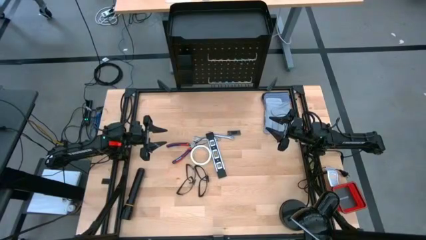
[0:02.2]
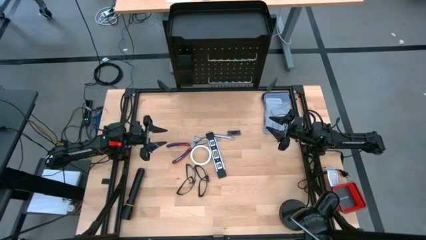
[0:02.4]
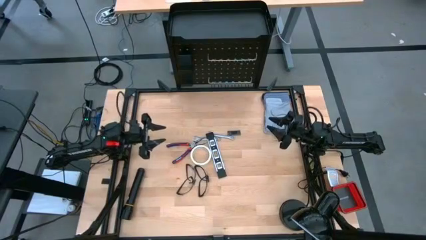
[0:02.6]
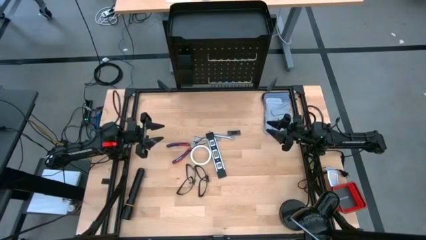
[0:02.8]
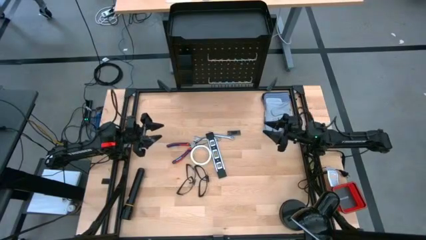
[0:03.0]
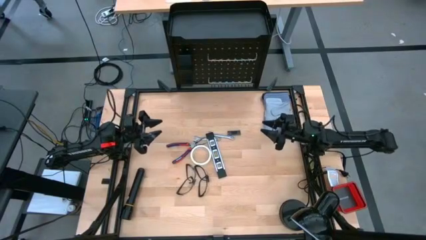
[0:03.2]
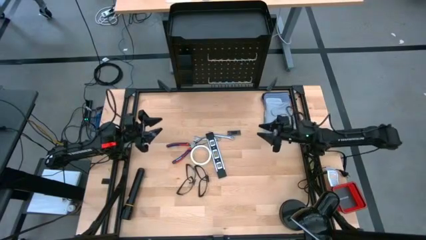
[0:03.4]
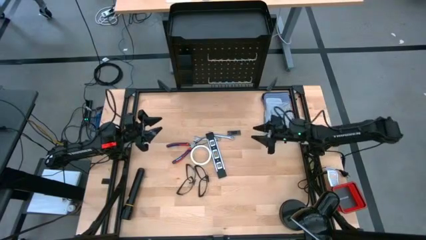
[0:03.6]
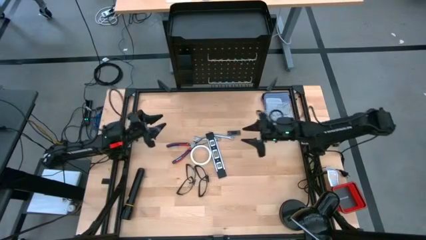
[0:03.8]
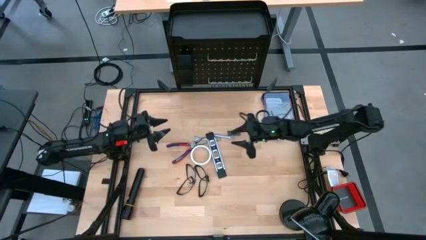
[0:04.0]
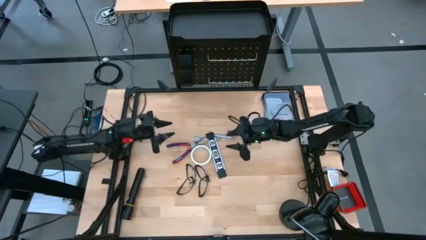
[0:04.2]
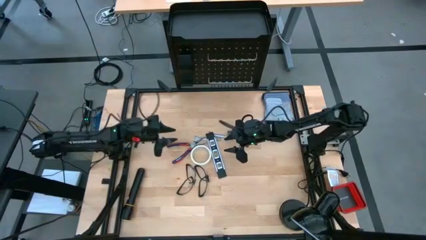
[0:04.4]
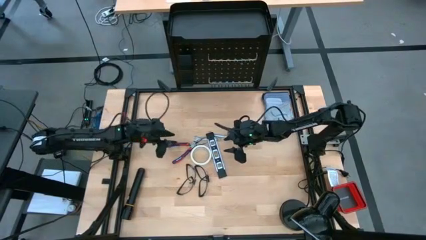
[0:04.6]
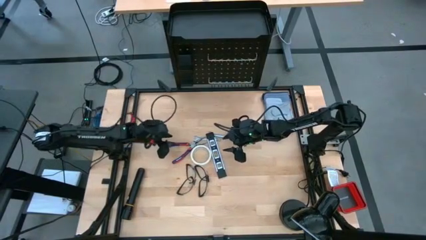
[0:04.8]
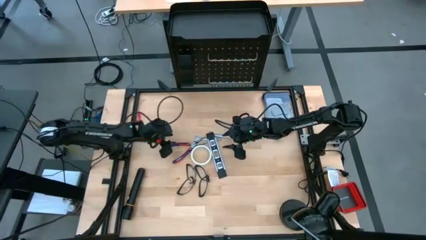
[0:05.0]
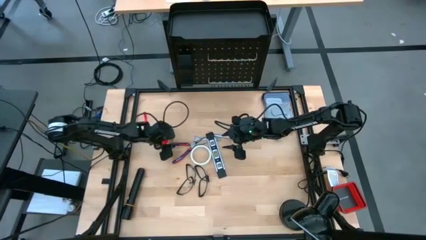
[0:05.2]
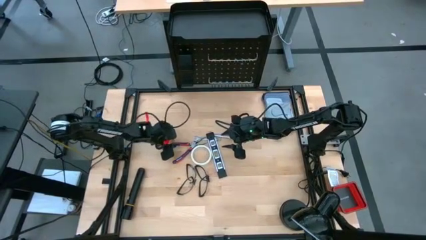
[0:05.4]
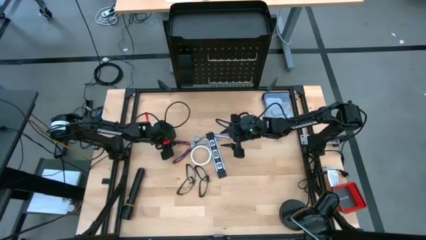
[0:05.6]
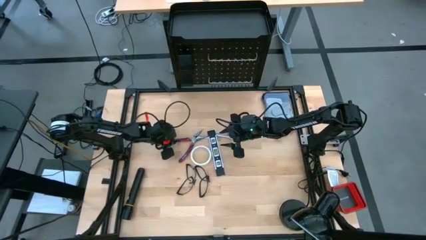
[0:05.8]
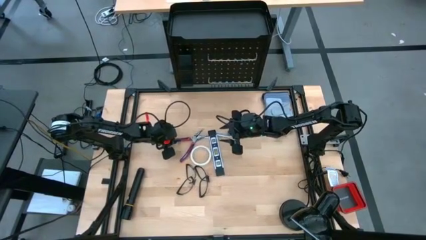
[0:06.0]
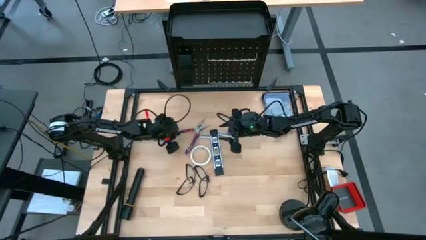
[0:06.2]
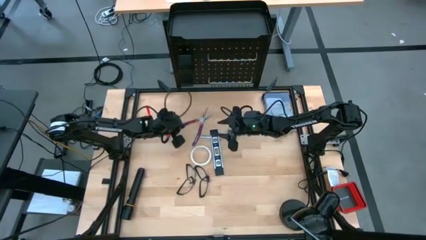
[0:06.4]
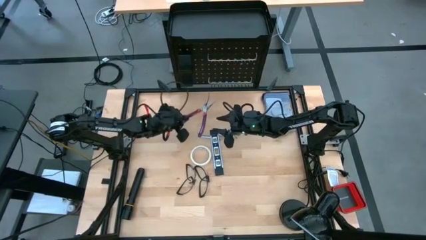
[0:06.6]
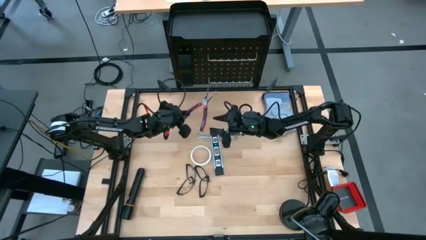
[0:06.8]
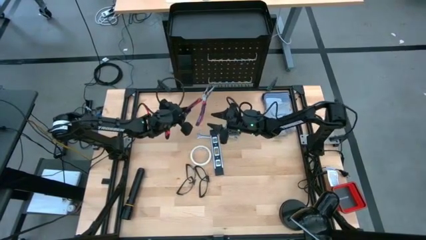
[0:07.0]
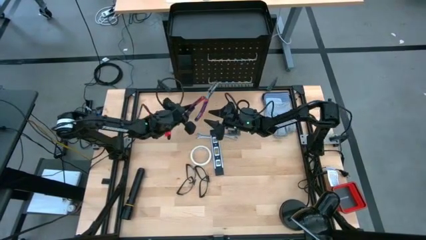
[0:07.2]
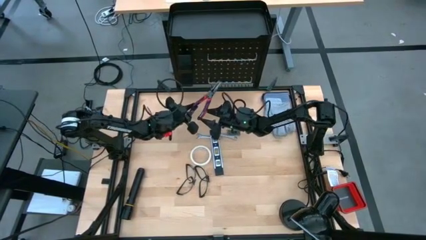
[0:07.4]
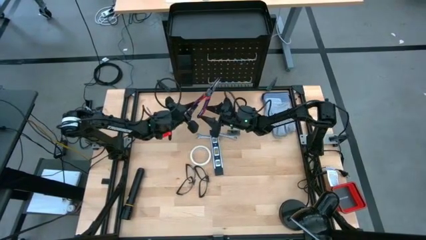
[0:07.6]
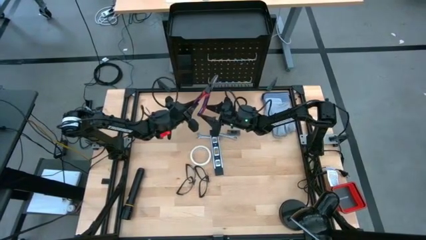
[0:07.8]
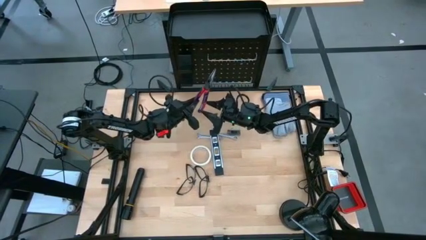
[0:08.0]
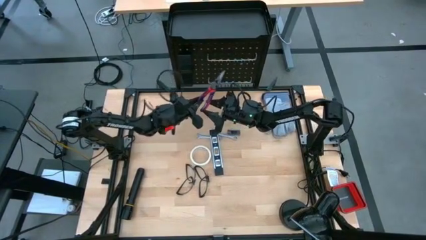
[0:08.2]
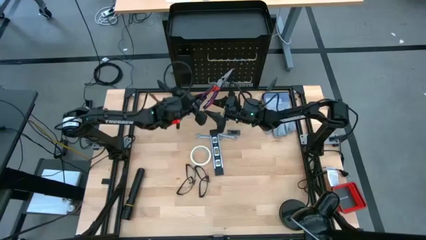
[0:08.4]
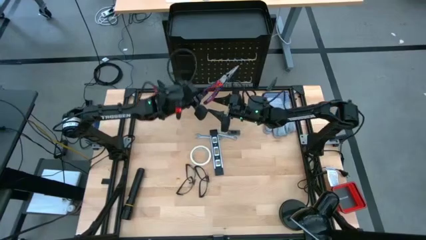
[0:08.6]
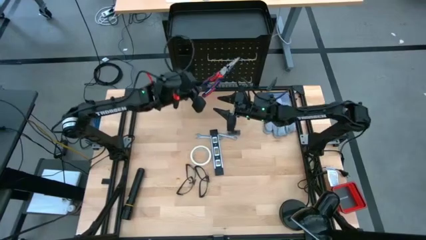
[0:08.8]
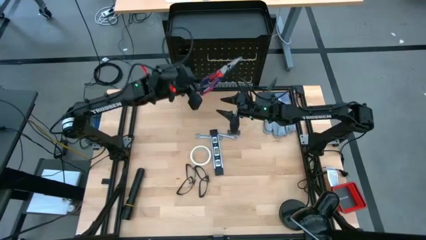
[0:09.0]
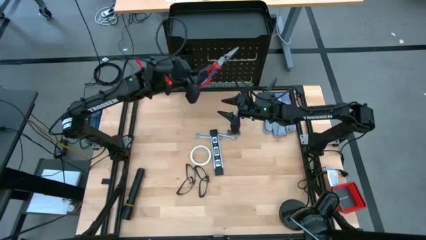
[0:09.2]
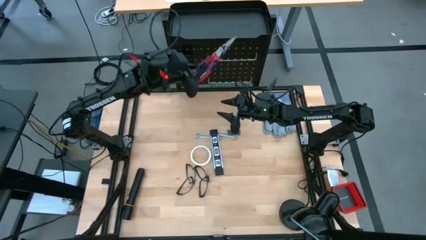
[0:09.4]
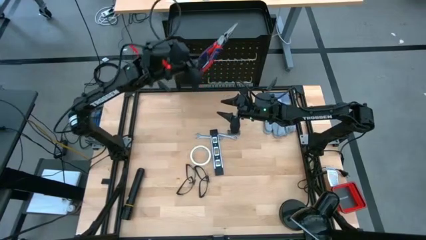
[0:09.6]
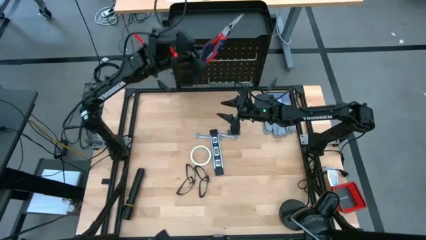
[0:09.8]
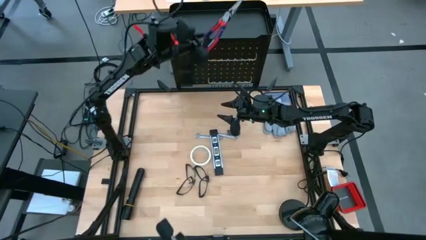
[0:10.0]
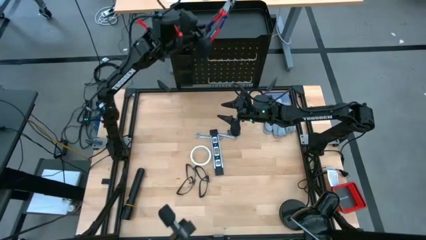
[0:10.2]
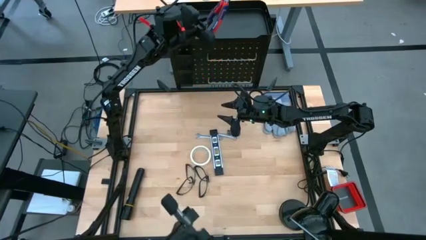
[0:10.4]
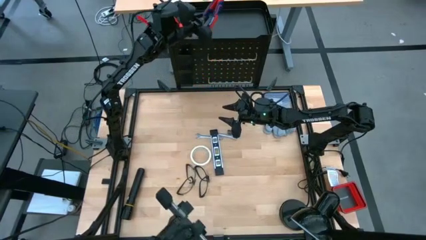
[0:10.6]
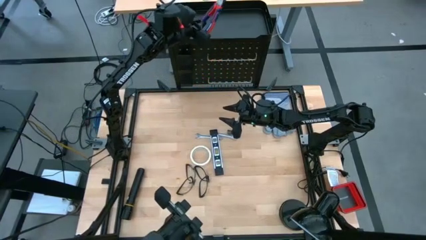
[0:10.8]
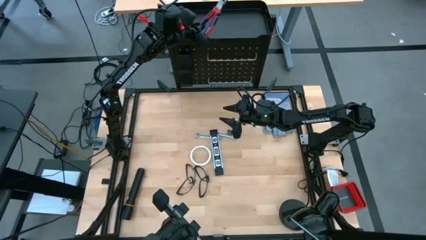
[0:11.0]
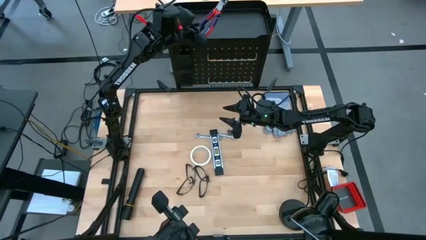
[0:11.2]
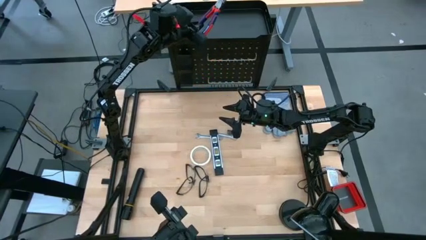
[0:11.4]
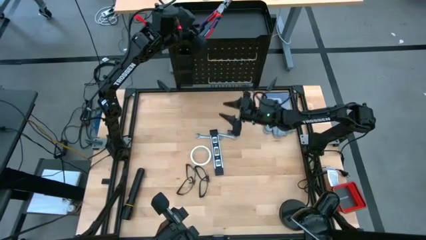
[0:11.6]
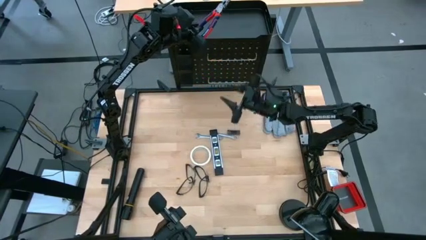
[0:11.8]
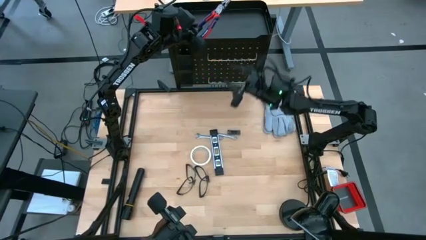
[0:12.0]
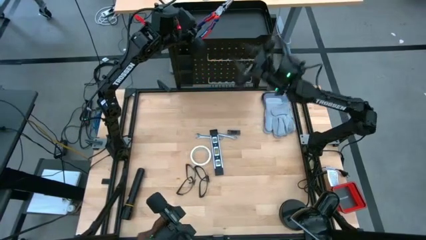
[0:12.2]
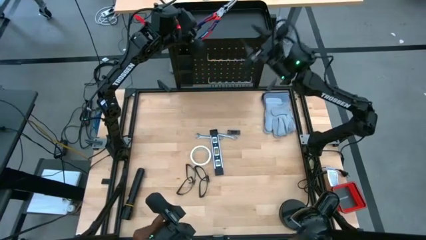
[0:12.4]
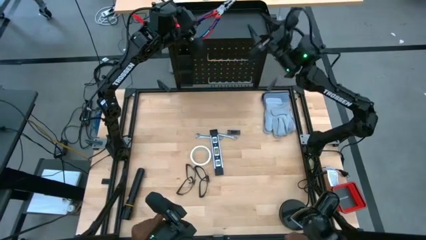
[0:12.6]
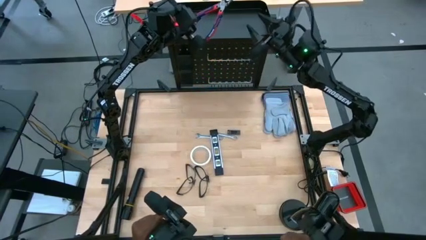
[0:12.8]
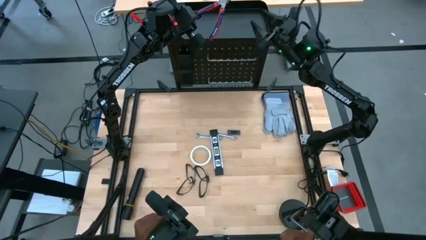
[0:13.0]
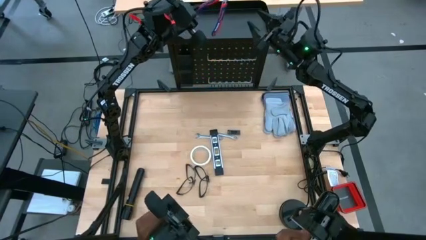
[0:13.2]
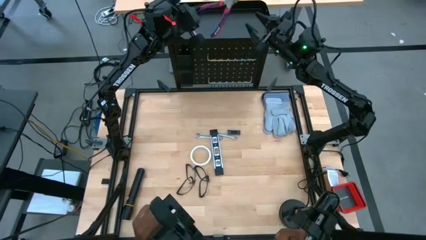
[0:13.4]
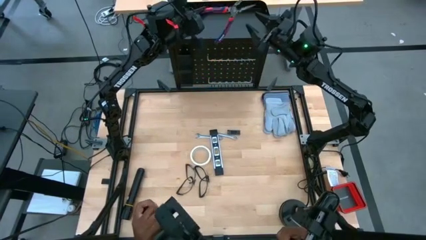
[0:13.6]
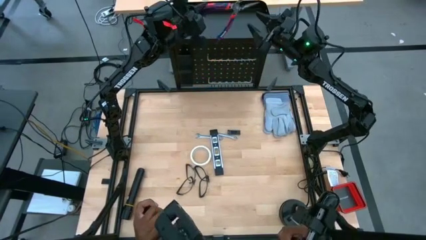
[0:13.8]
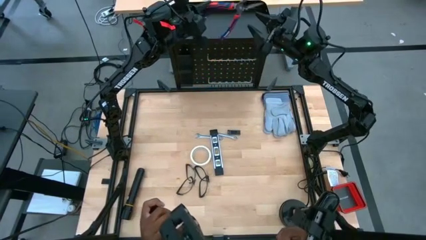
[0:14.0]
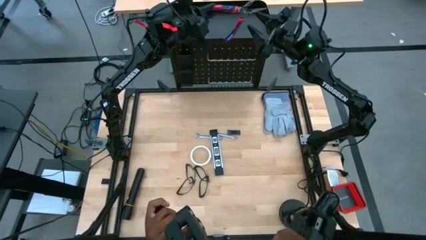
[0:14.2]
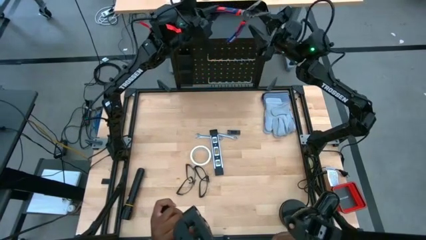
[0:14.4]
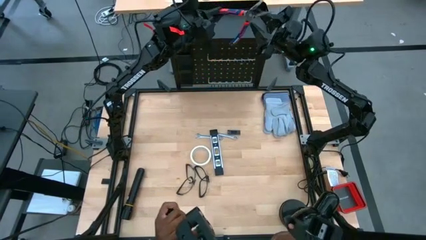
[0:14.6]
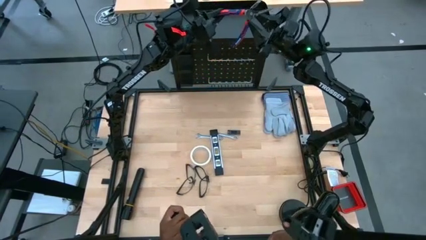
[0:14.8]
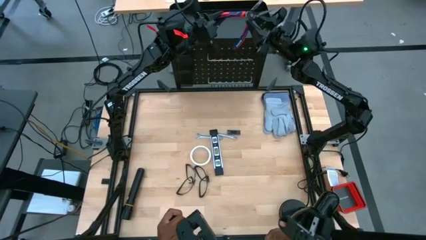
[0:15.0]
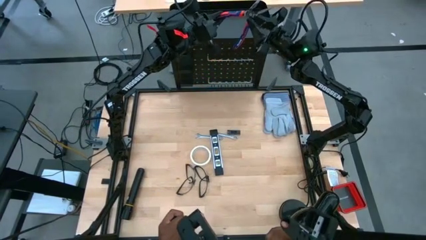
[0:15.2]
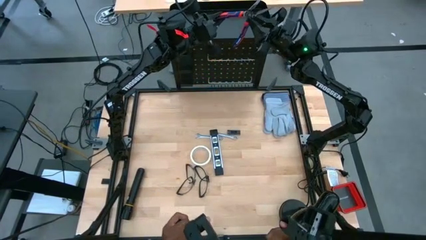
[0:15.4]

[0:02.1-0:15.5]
Task: Hang tools onto peg board
Put the blue-orange pliers on the black pegboard
